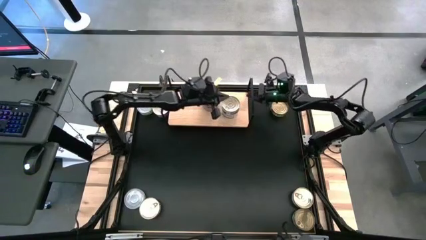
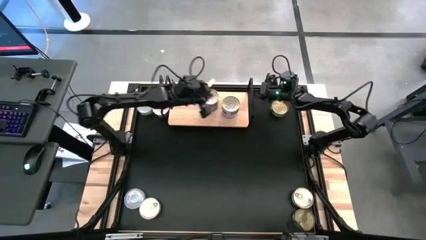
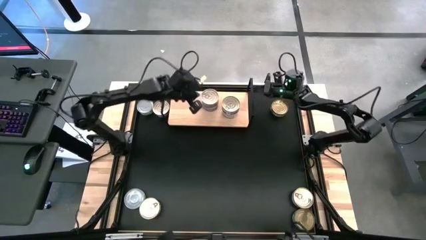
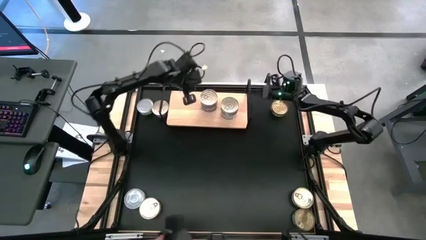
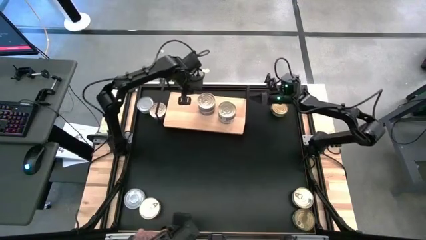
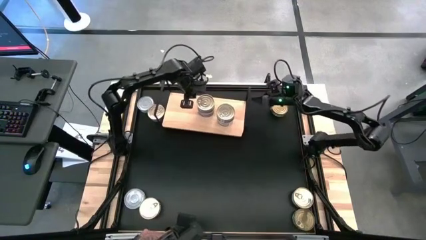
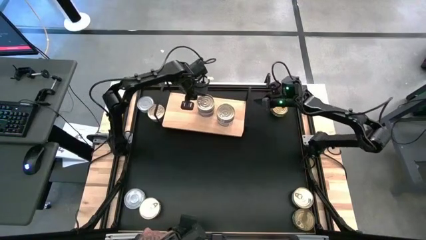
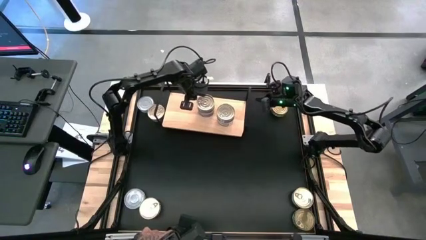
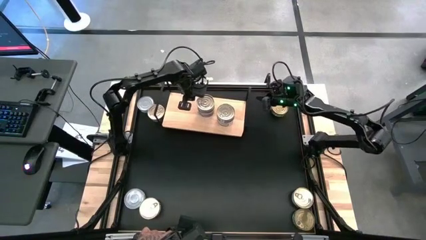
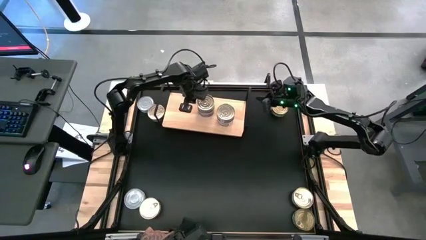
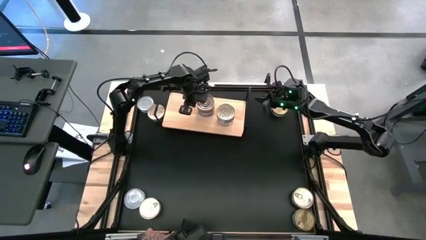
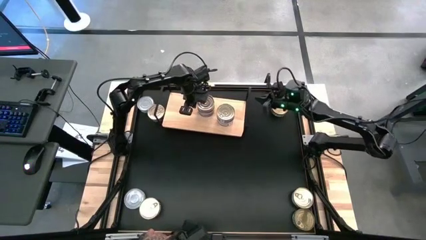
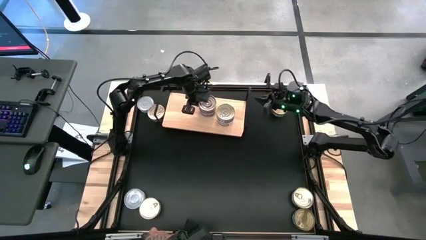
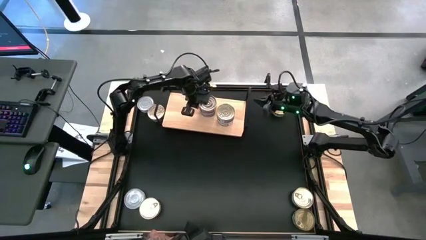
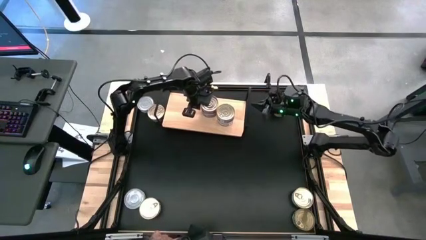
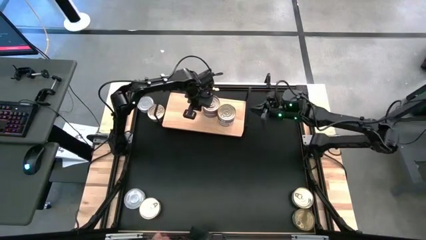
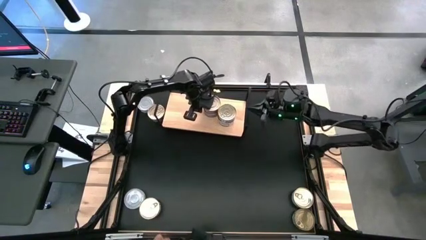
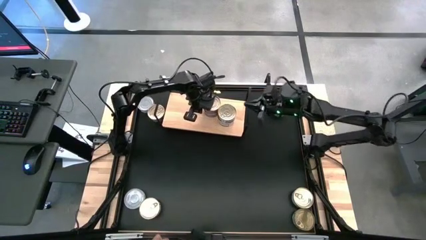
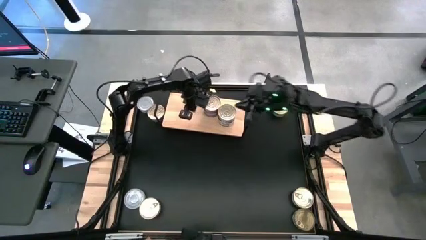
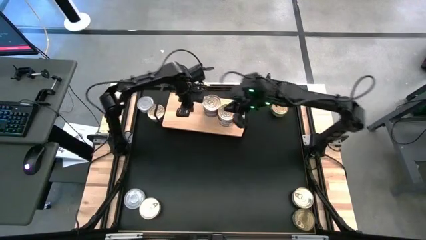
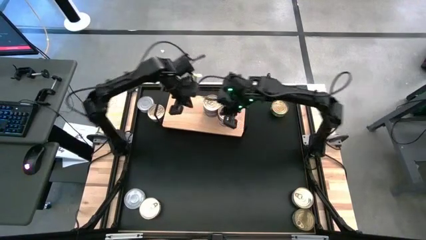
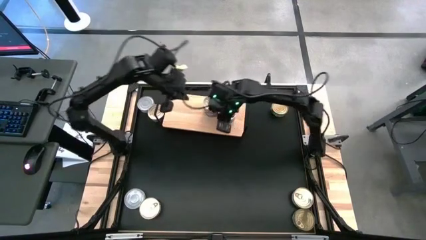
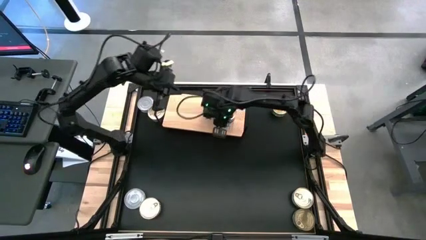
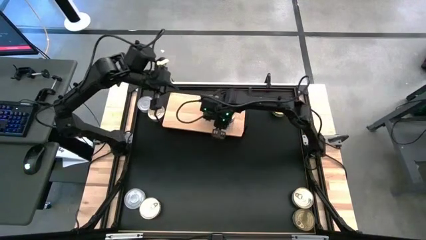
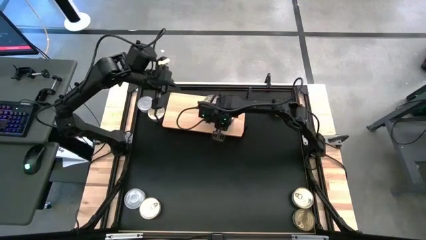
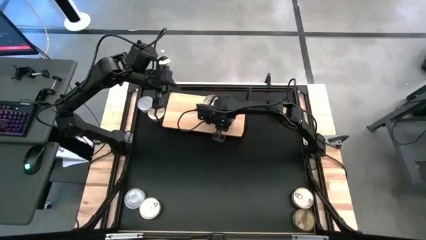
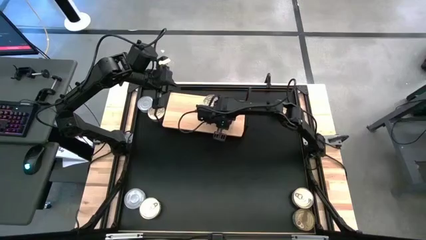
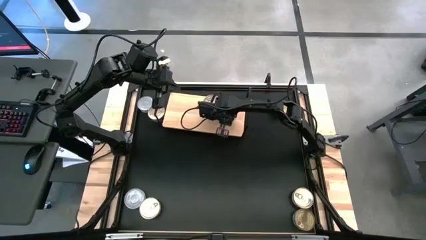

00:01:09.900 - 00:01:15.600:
Task: Stack canned seafood by type on shelf
Adjust the tuna cans on the shelf

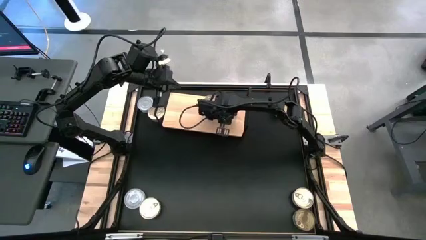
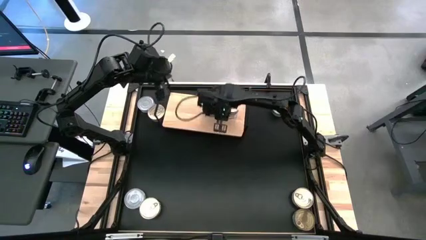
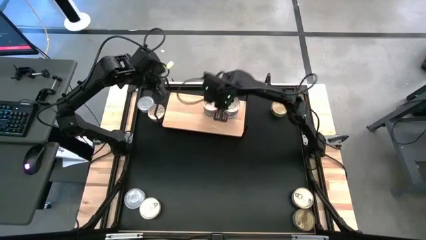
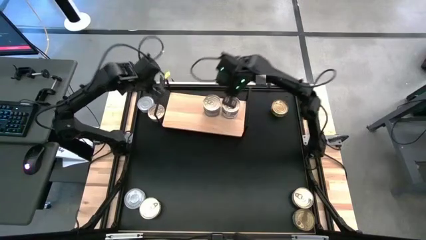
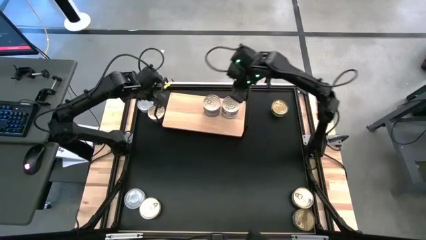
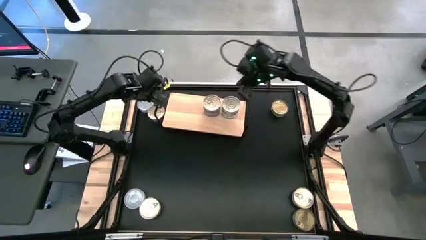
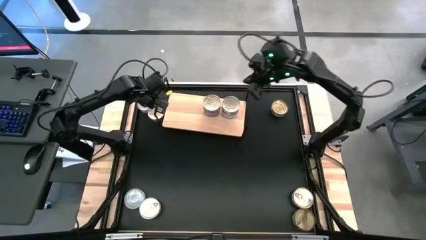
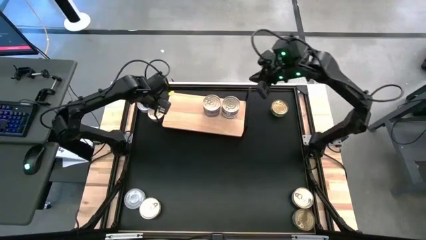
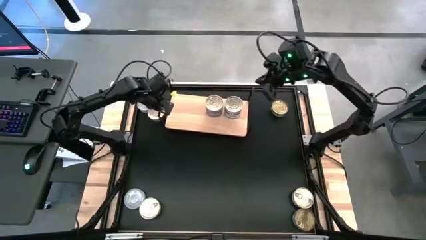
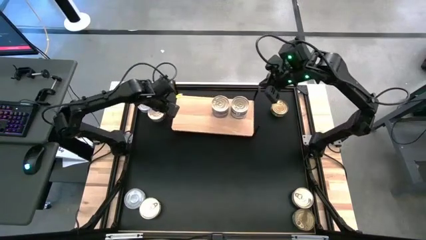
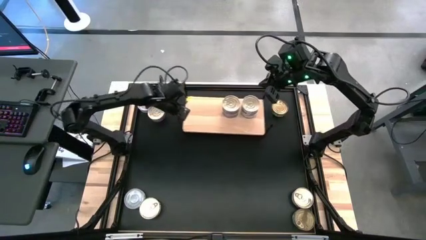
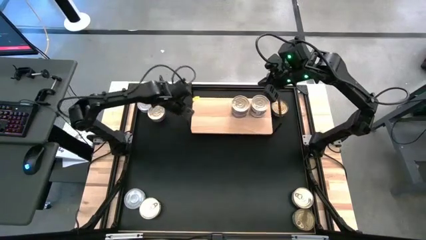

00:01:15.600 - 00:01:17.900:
Adjust the shelf

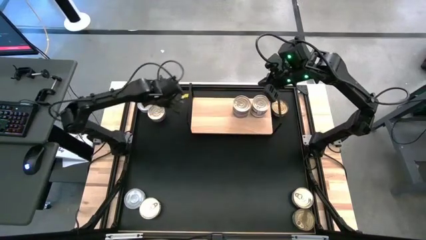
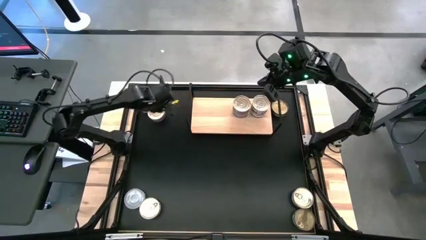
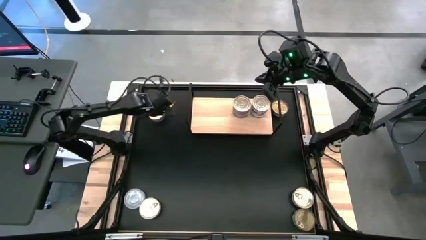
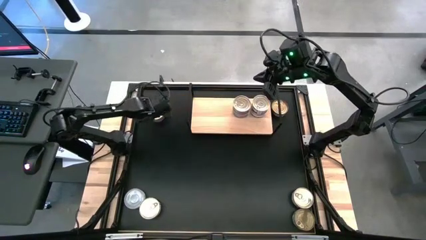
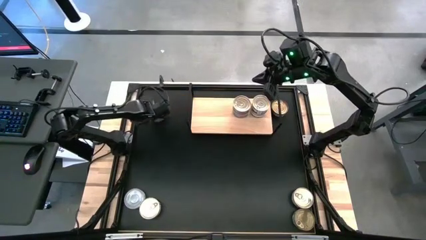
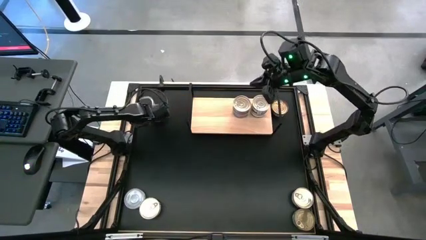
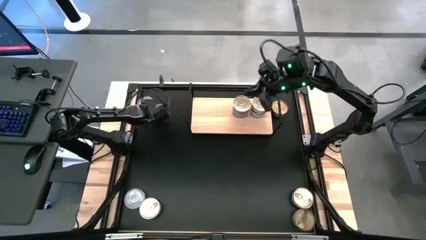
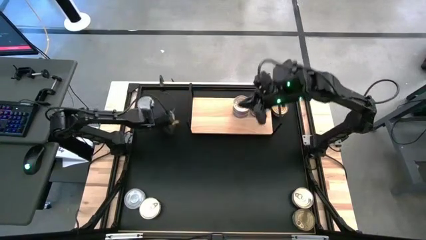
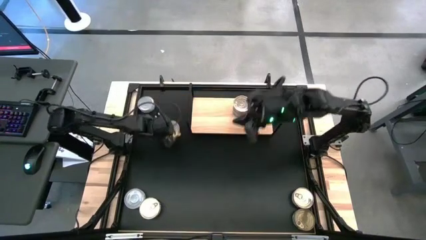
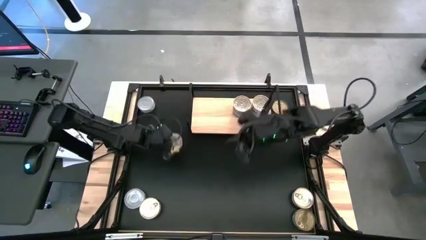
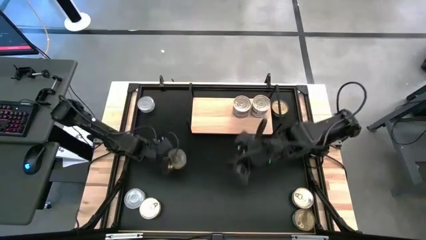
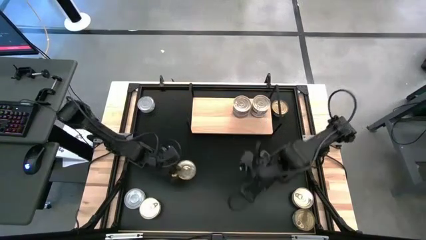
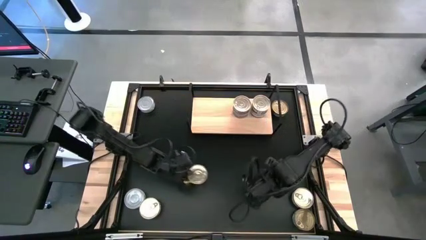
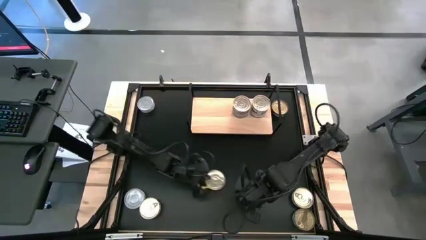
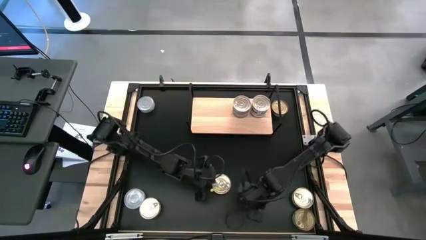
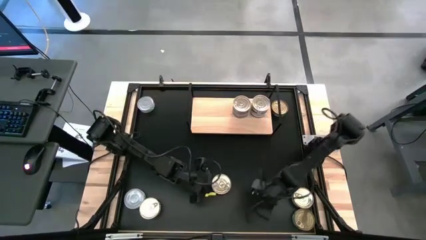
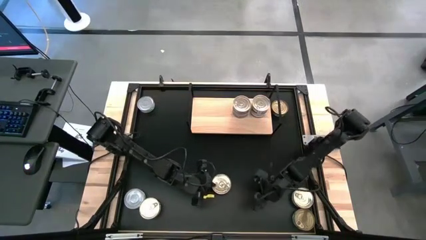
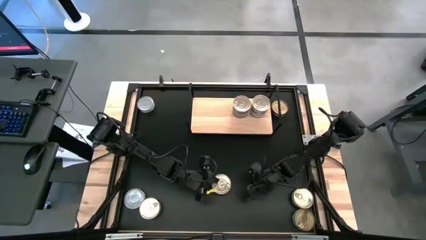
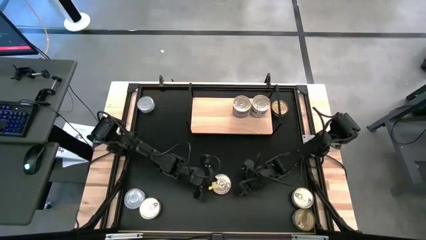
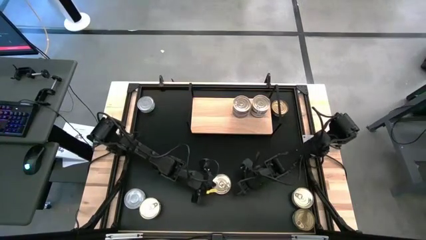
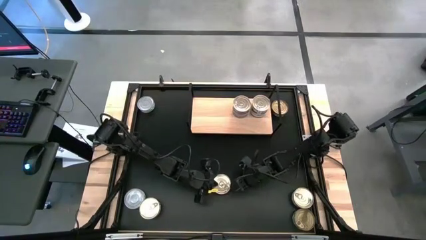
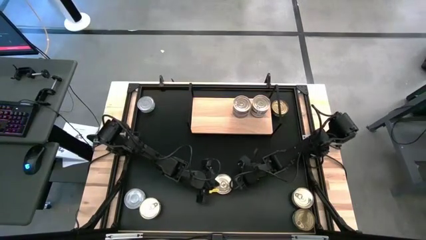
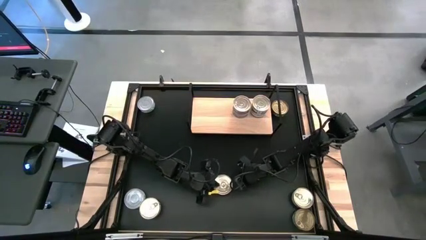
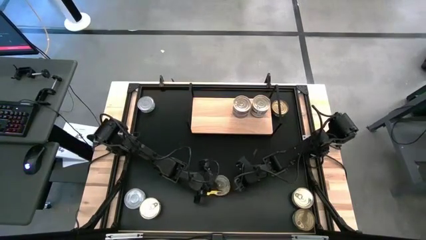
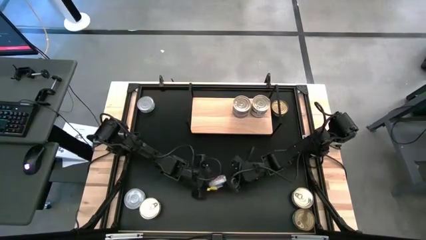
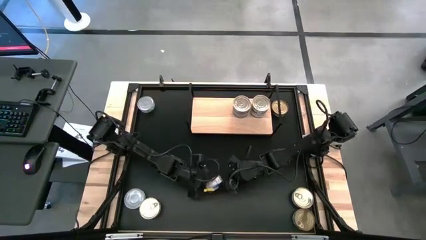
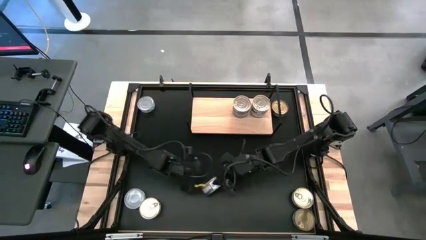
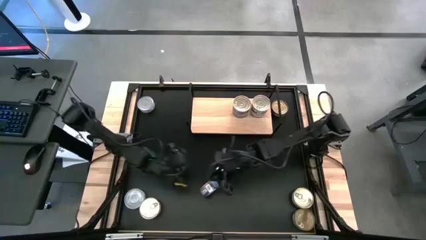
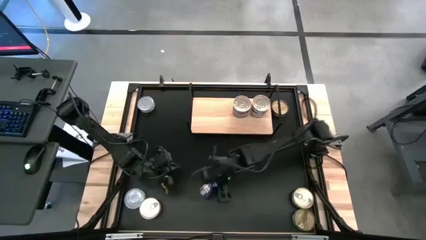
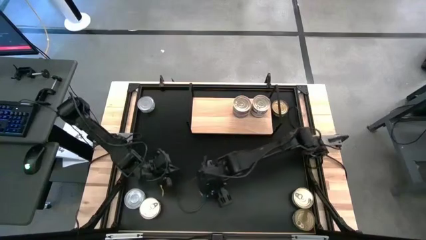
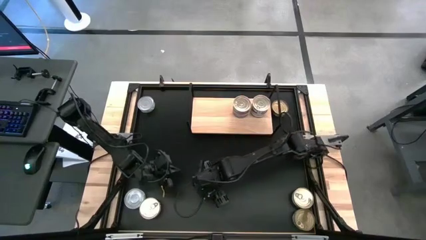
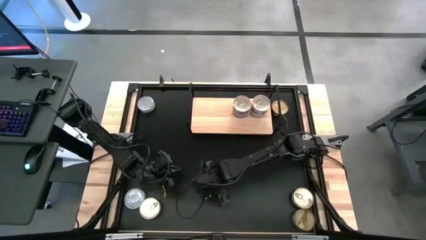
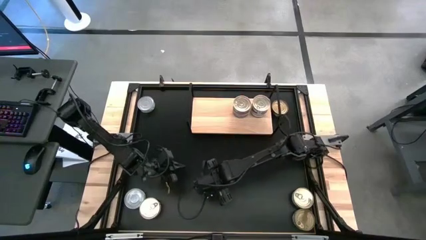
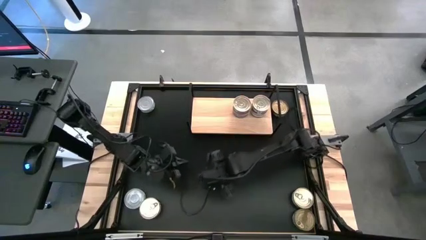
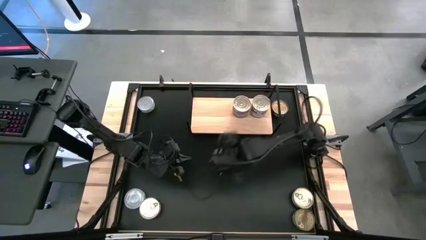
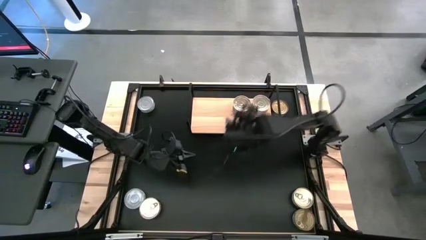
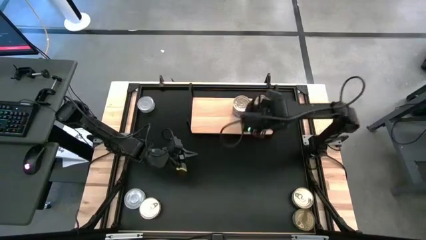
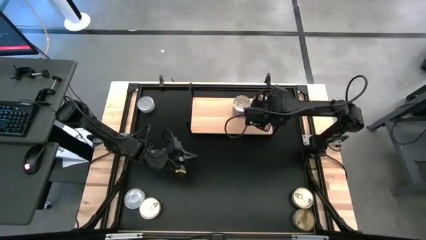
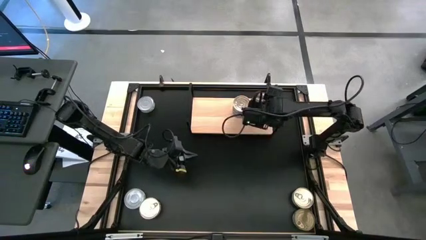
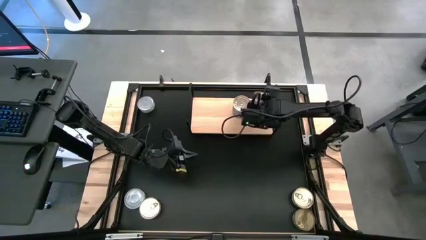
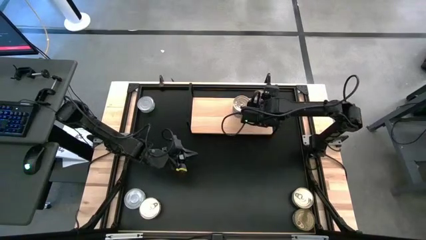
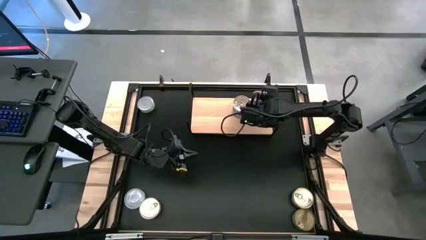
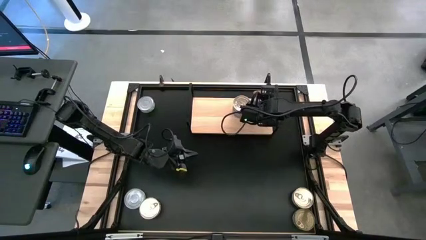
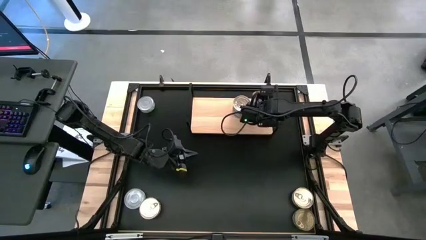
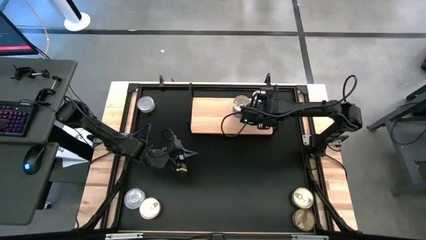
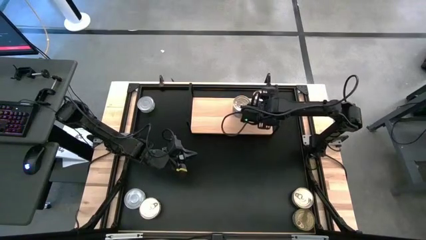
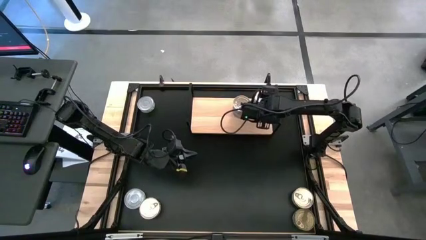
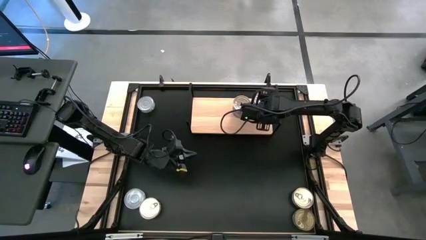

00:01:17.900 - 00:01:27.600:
Stack the blue-pink tuna can on top of the other blue-pink tuna can on the shelf
